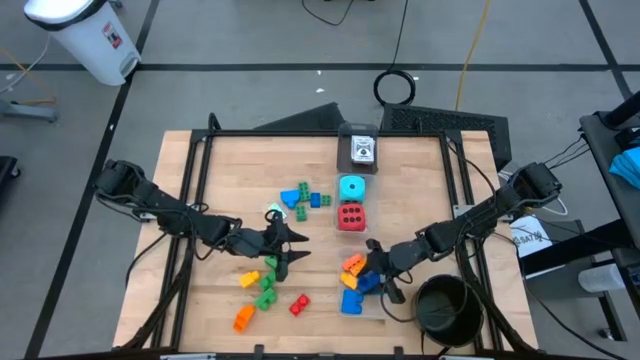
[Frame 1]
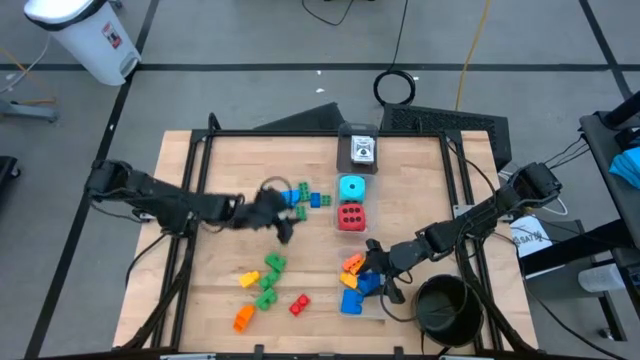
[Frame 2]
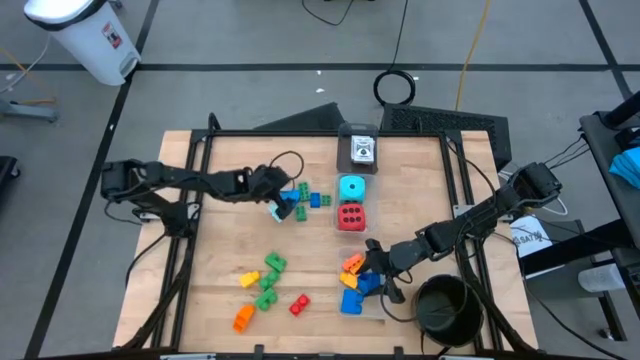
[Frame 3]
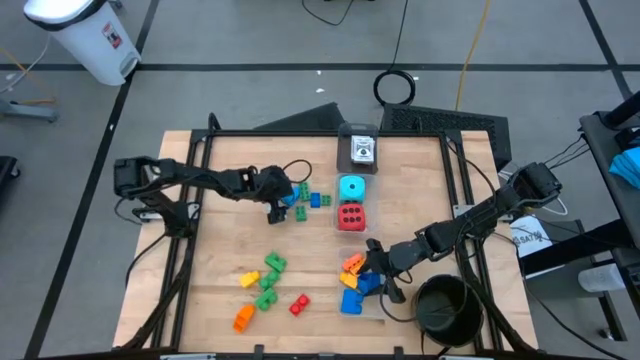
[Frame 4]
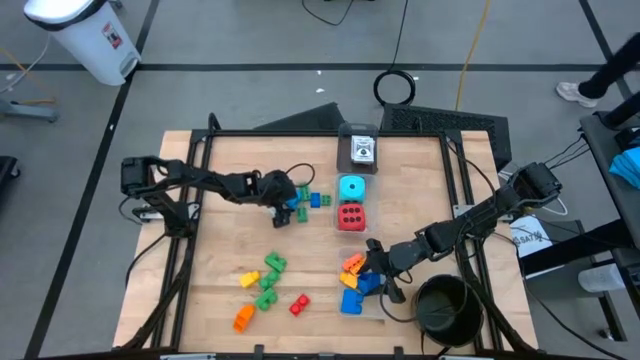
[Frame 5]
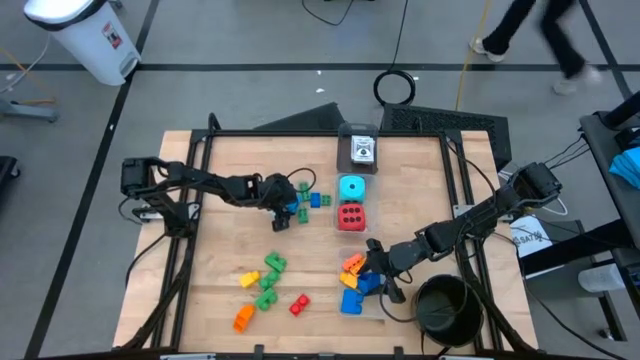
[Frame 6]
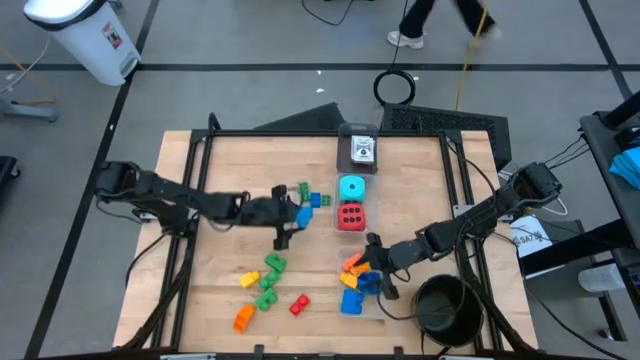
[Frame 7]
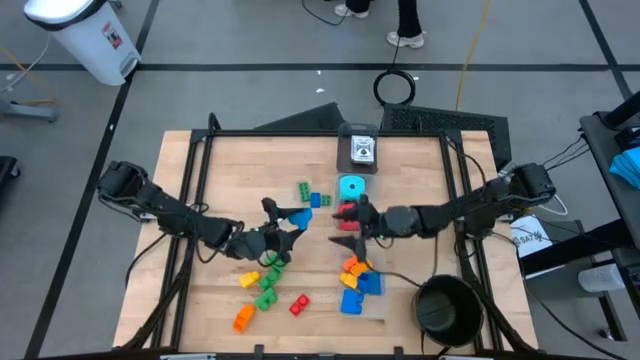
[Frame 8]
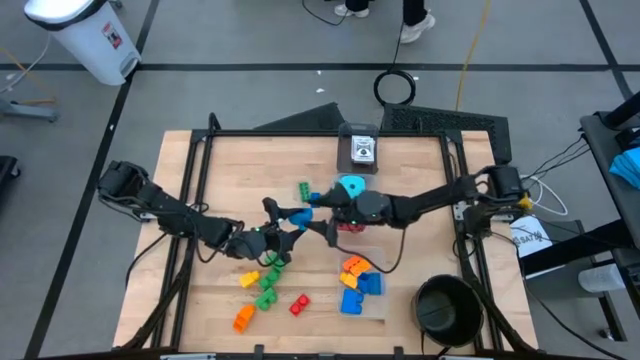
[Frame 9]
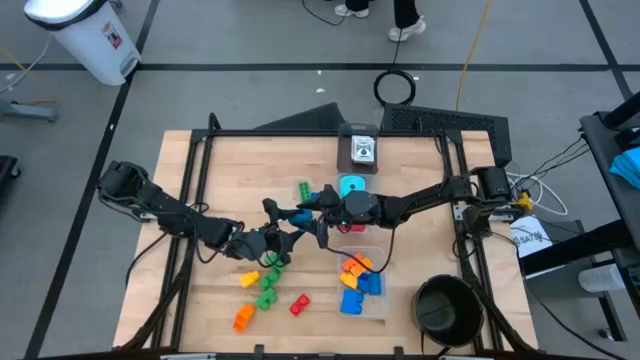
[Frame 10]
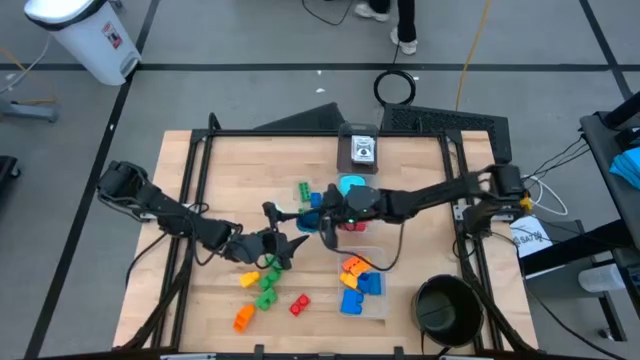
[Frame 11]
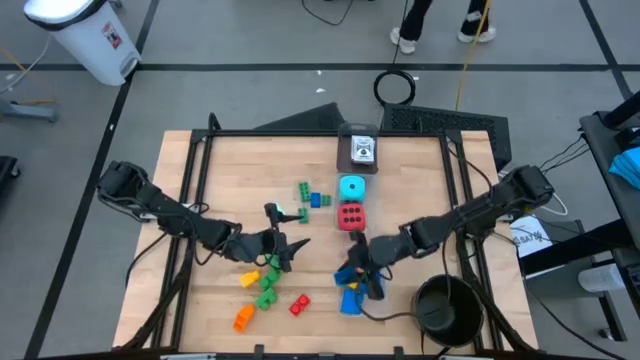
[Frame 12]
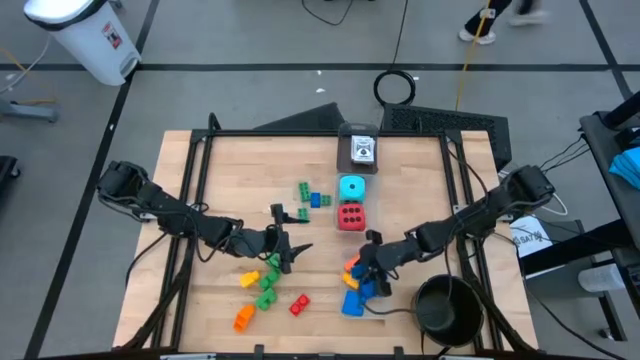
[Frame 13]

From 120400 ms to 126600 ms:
Task: Pick & Place Toys
Put the blue 1 stud game piece into the bottom transparent bin

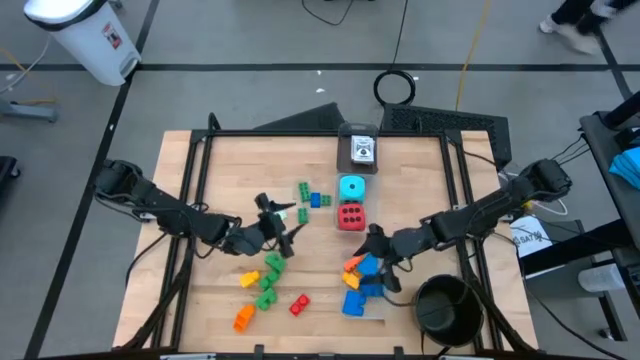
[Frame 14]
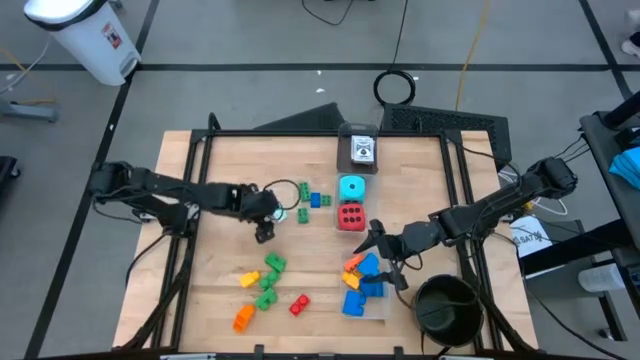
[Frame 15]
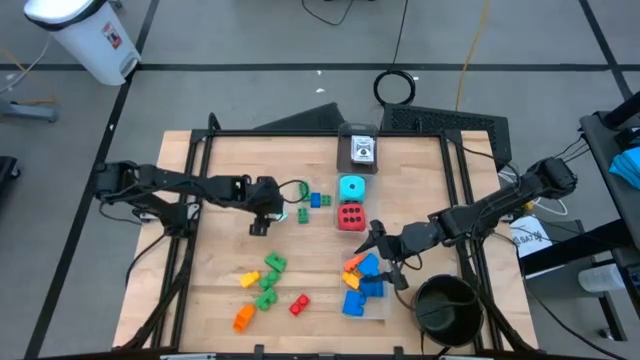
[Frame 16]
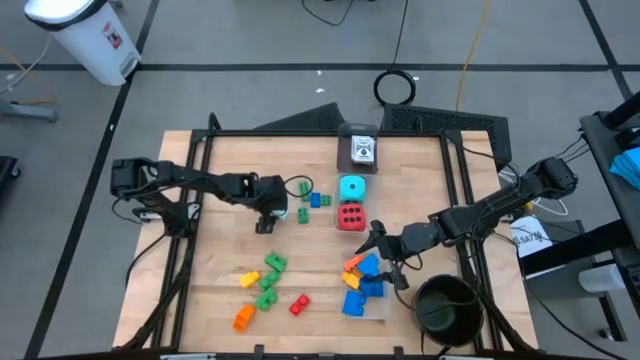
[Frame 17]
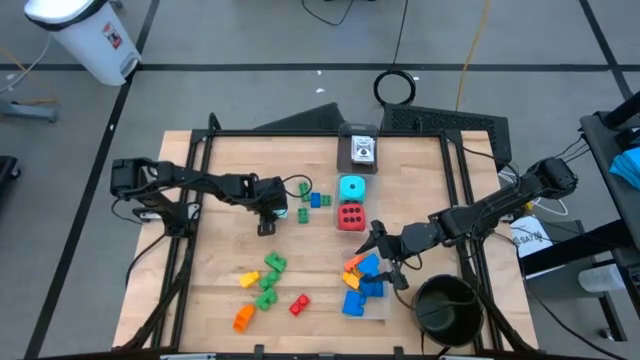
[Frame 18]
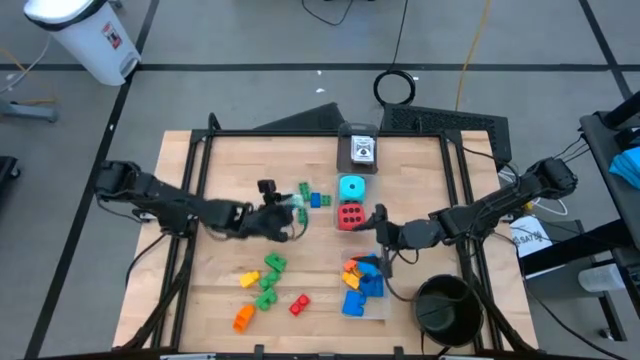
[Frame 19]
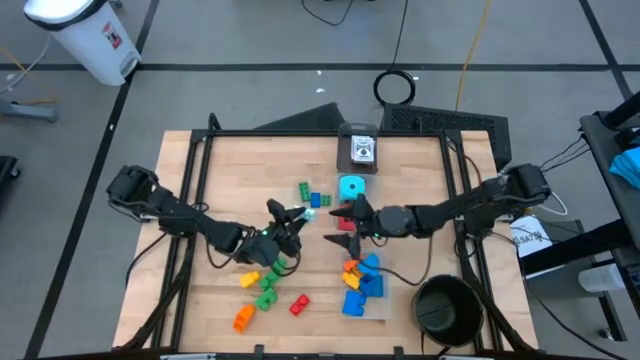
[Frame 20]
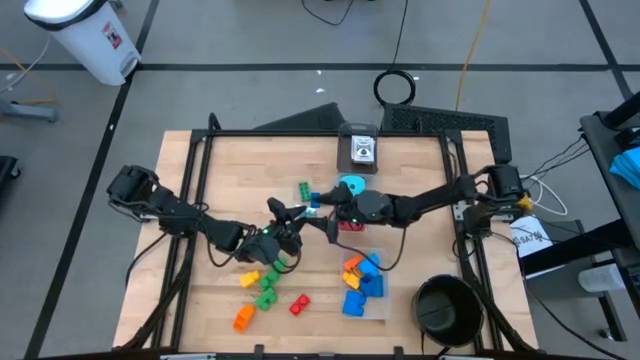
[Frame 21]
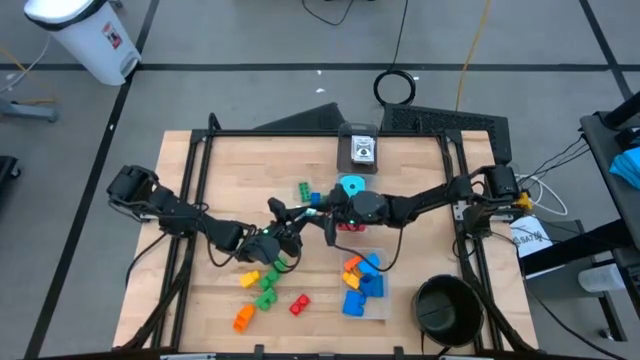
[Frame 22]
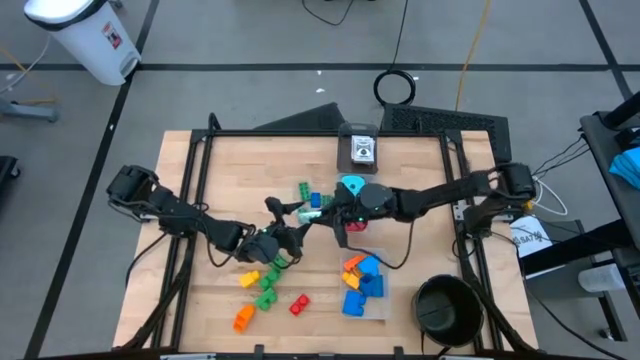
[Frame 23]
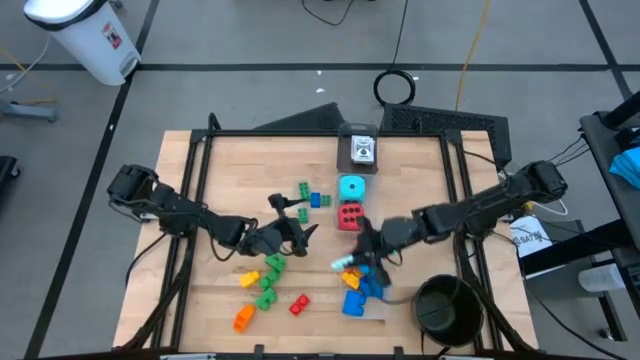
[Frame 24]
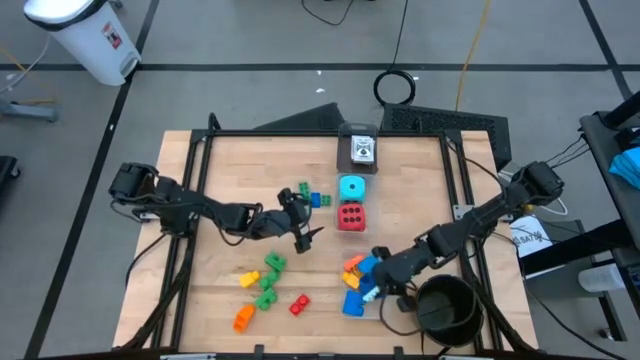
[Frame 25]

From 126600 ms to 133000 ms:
Put the light green 8 stud game piece into the bottom transparent bin

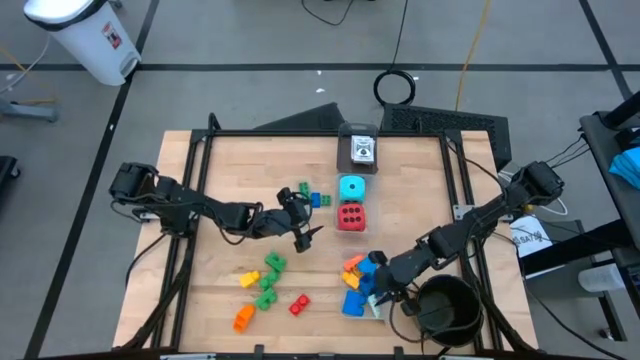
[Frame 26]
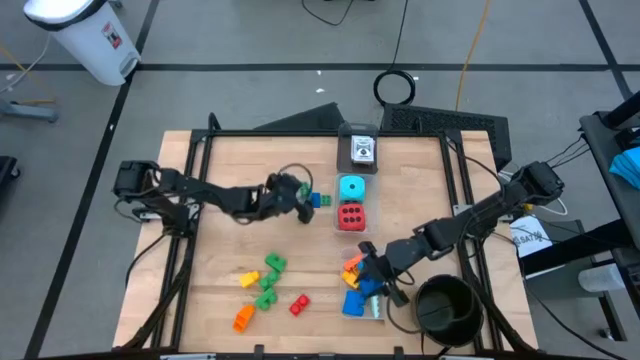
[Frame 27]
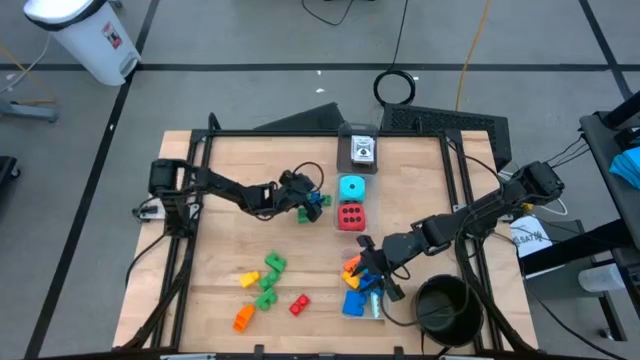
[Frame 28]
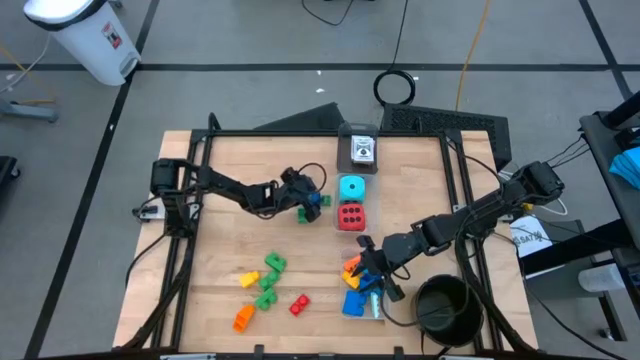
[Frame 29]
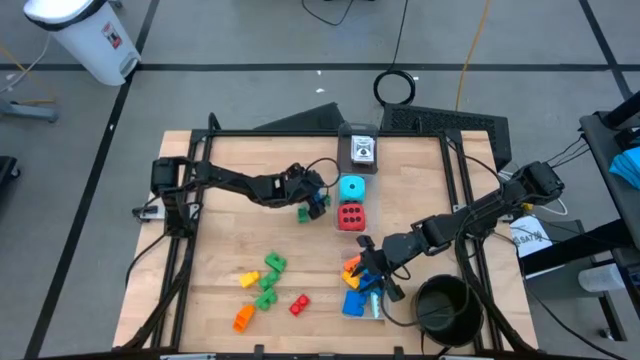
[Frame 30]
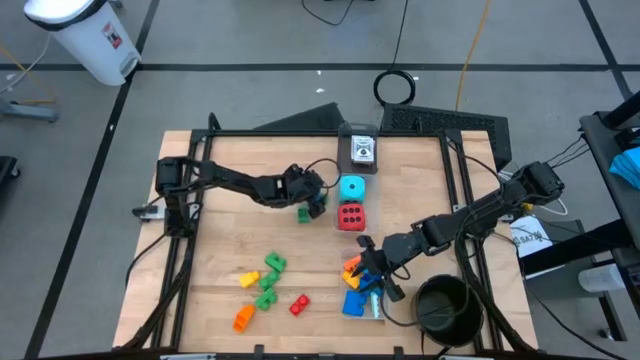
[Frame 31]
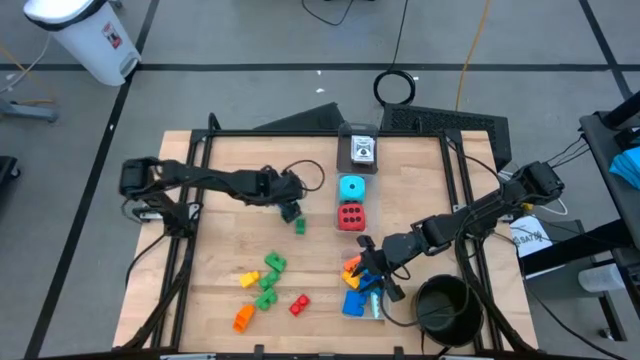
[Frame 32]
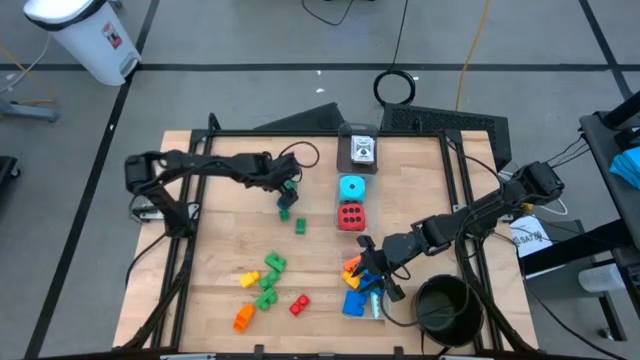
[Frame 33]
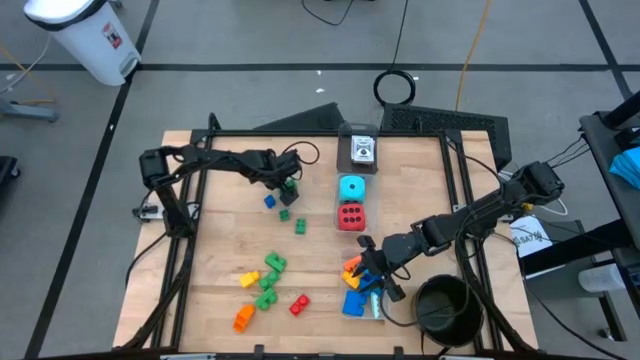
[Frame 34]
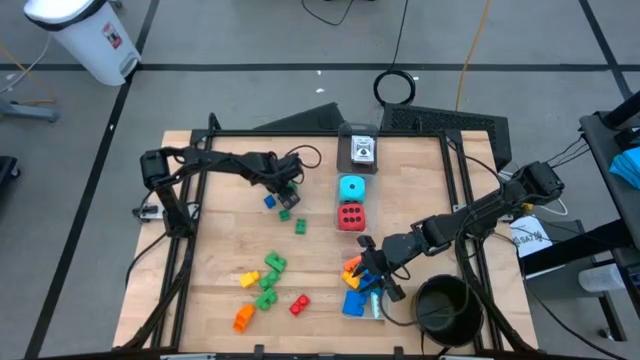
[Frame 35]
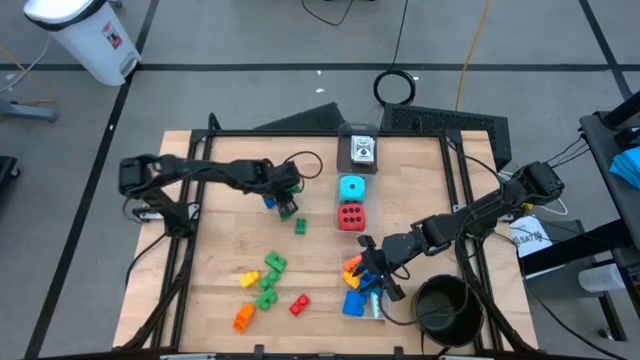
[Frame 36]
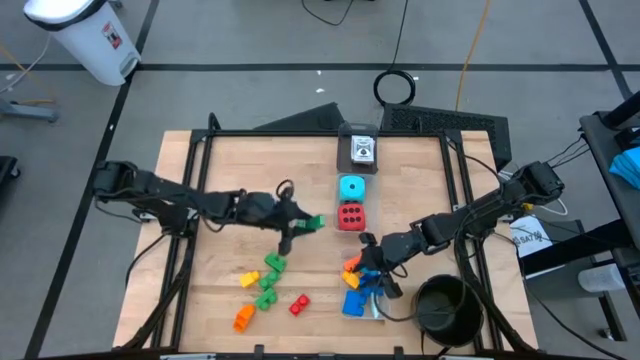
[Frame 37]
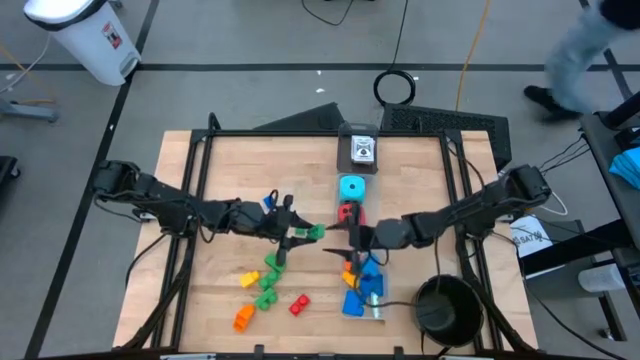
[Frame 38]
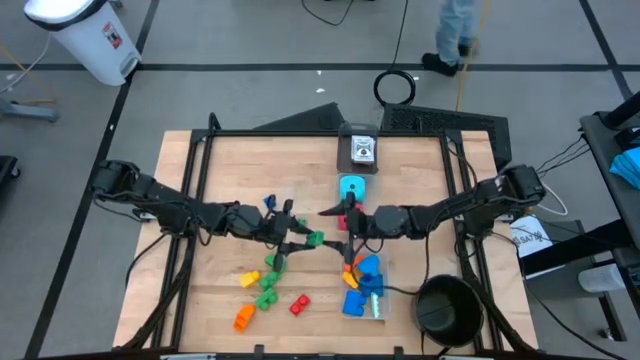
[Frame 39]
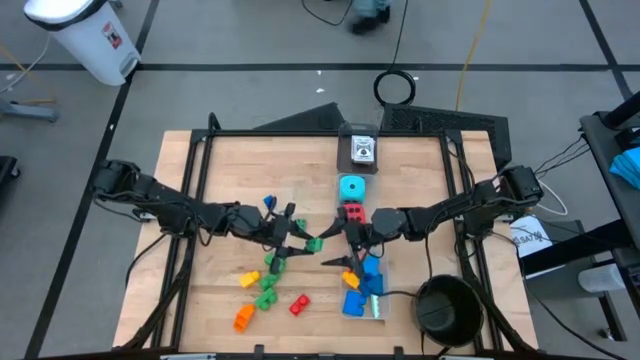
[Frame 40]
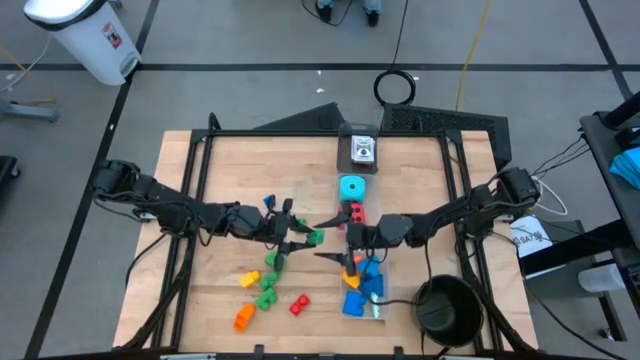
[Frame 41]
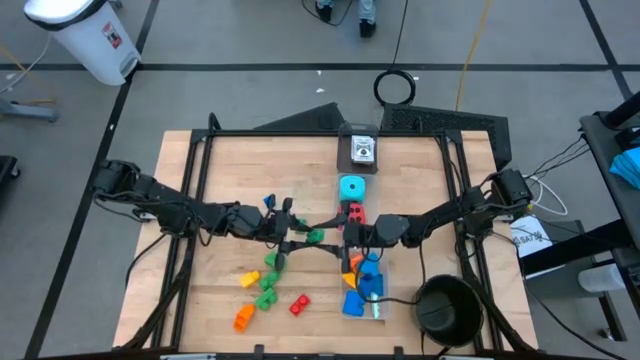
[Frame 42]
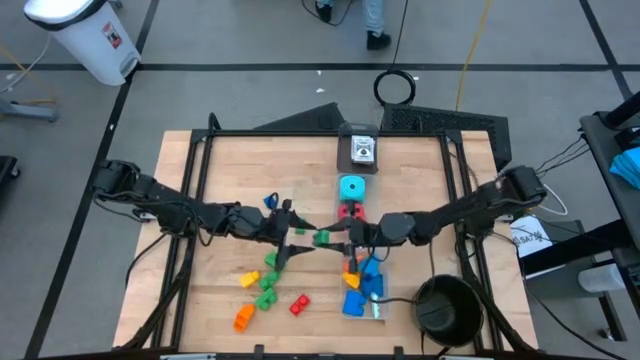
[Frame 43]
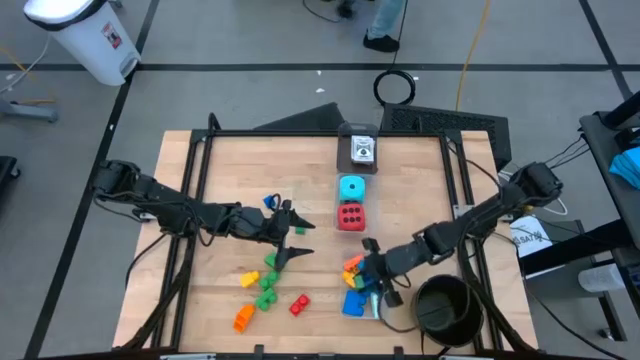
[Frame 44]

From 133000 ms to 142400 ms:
Put the green 8 stud game piece into the bottom transparent bin
